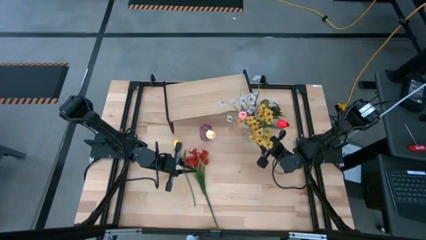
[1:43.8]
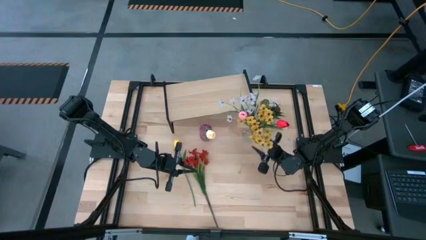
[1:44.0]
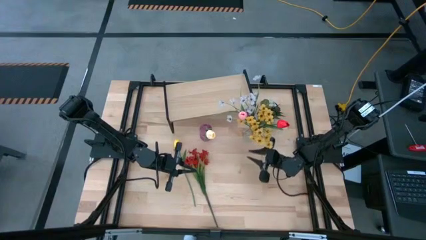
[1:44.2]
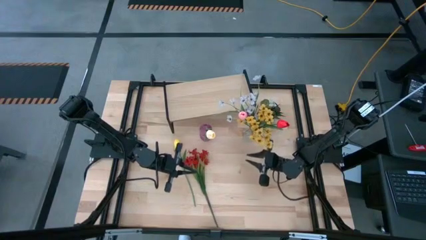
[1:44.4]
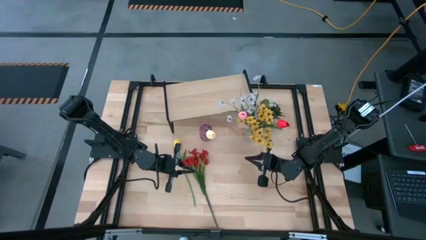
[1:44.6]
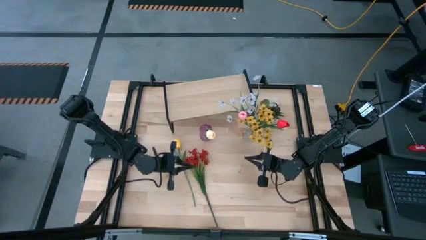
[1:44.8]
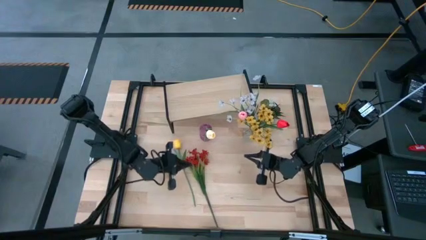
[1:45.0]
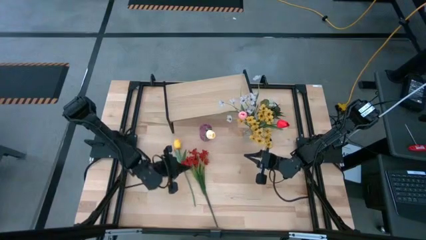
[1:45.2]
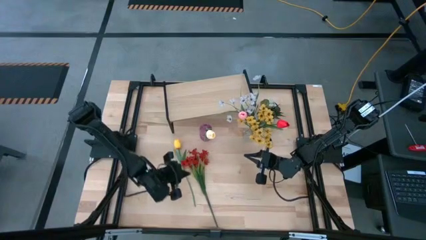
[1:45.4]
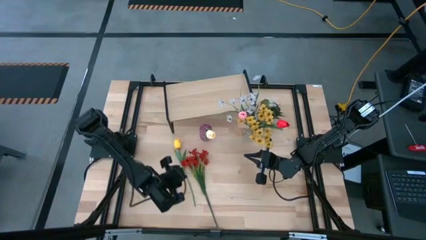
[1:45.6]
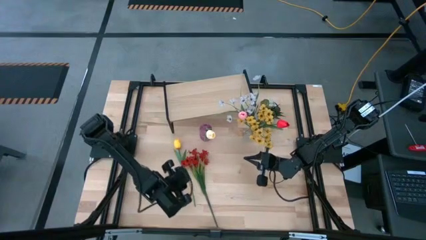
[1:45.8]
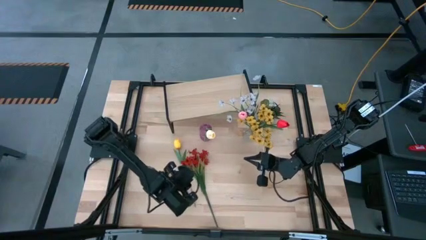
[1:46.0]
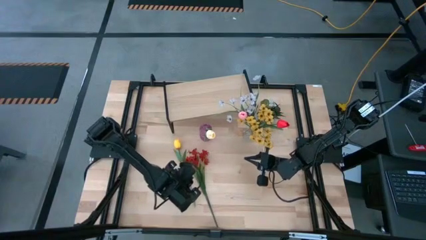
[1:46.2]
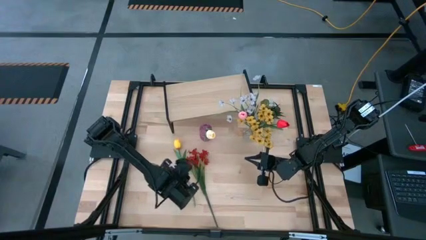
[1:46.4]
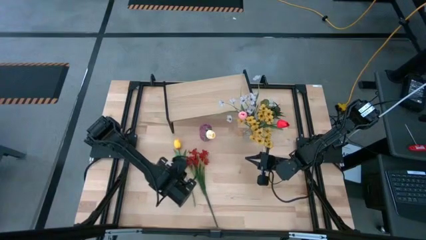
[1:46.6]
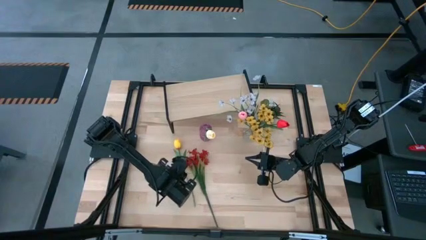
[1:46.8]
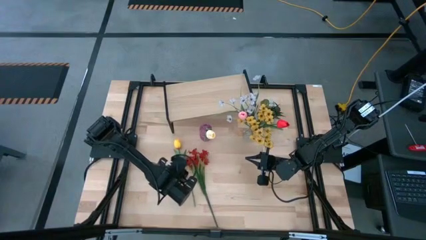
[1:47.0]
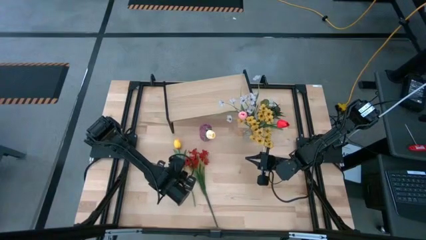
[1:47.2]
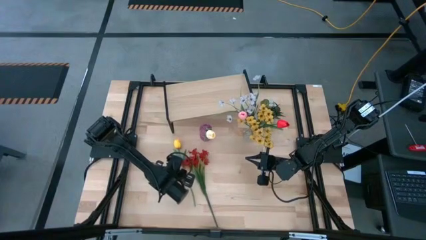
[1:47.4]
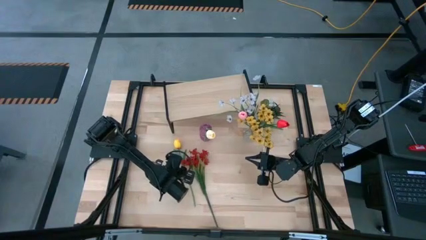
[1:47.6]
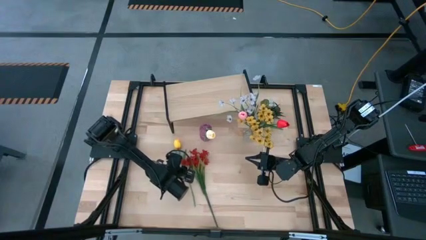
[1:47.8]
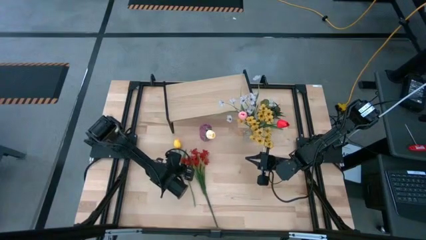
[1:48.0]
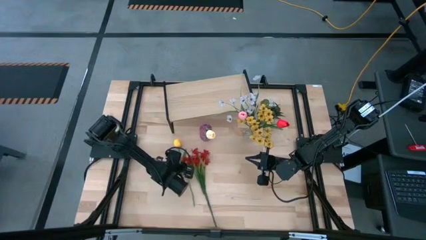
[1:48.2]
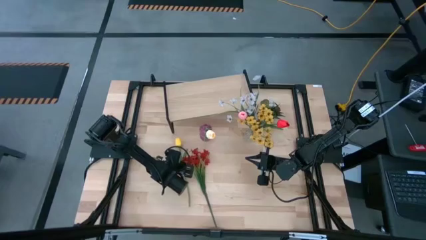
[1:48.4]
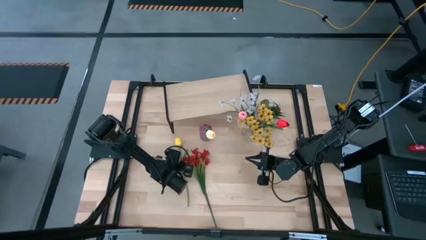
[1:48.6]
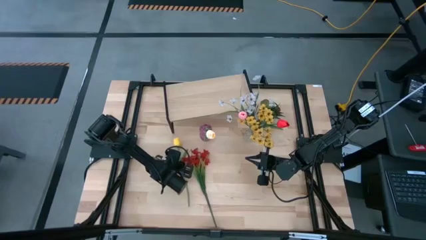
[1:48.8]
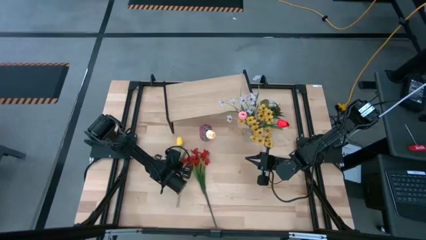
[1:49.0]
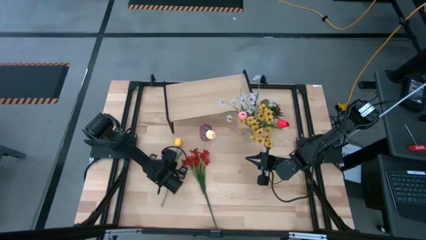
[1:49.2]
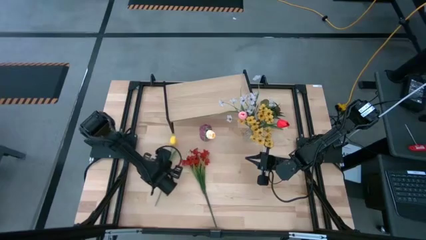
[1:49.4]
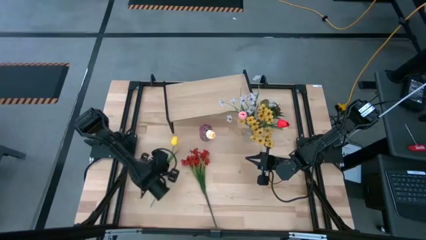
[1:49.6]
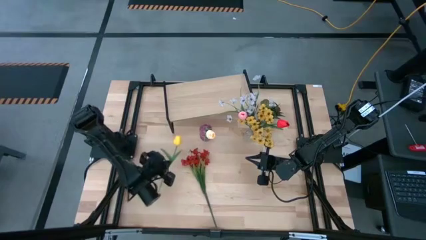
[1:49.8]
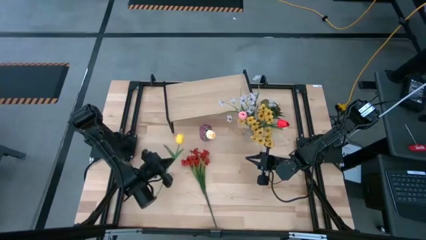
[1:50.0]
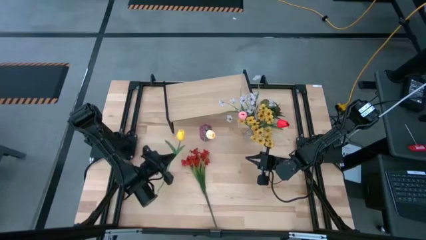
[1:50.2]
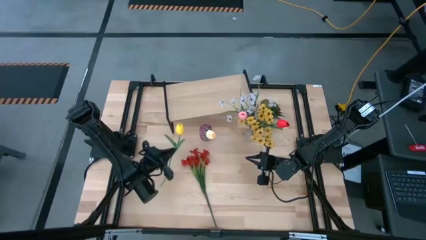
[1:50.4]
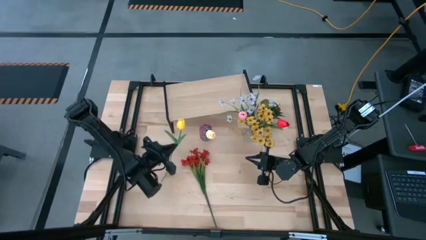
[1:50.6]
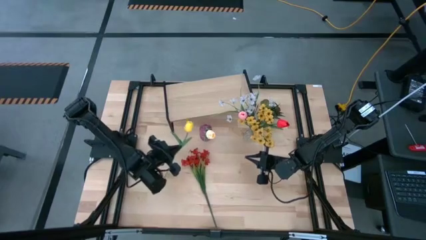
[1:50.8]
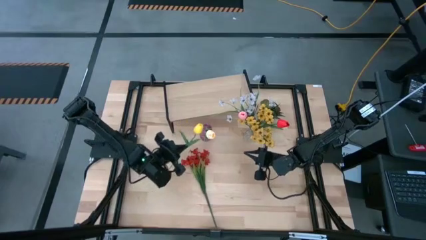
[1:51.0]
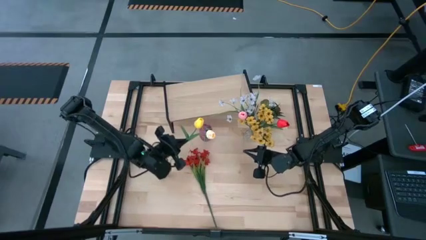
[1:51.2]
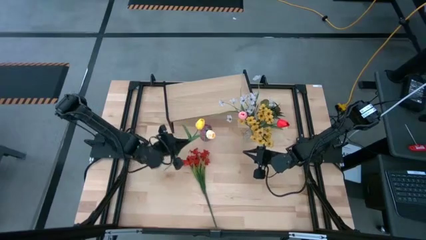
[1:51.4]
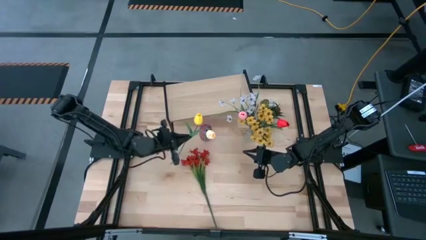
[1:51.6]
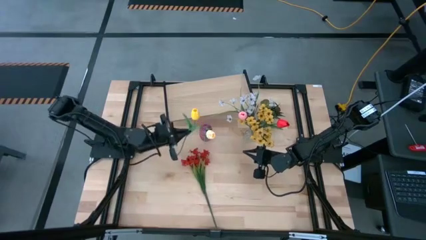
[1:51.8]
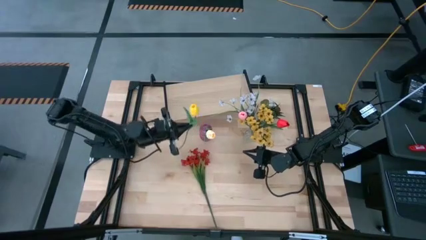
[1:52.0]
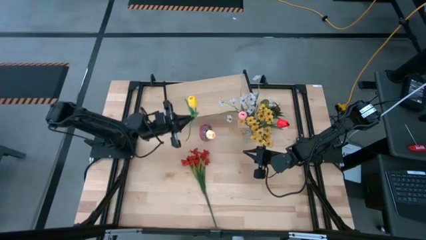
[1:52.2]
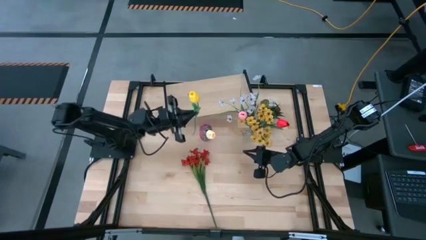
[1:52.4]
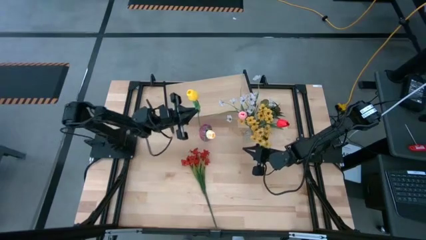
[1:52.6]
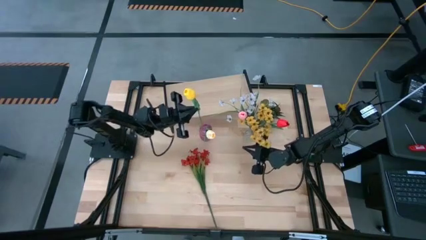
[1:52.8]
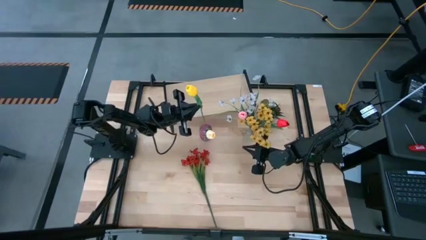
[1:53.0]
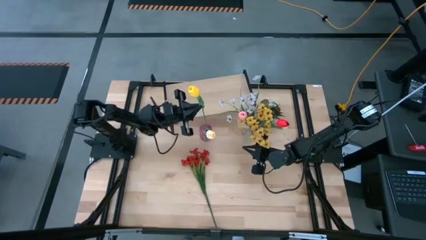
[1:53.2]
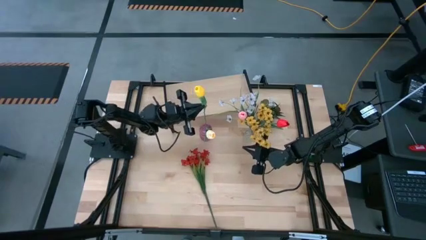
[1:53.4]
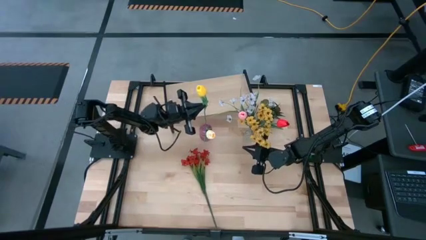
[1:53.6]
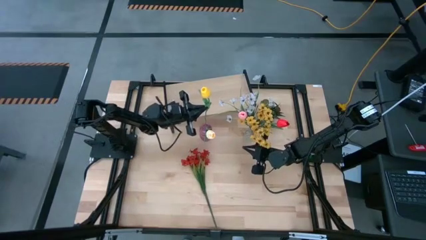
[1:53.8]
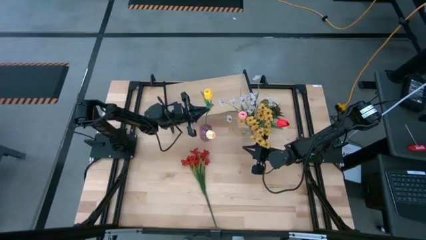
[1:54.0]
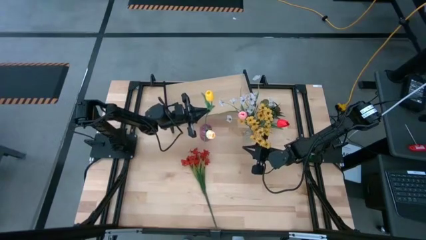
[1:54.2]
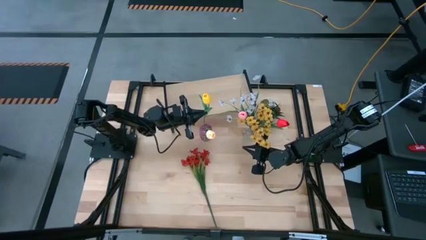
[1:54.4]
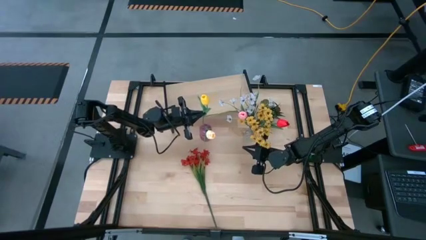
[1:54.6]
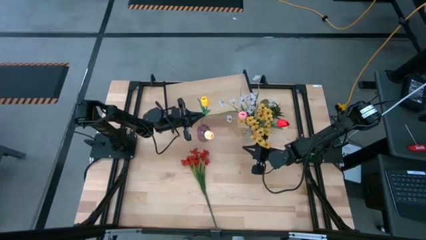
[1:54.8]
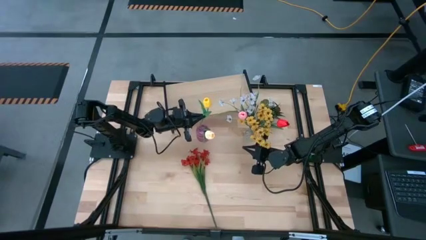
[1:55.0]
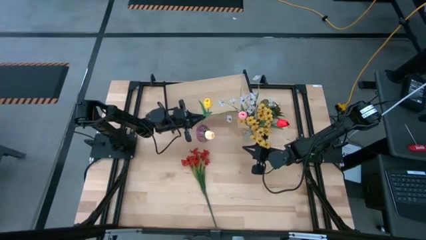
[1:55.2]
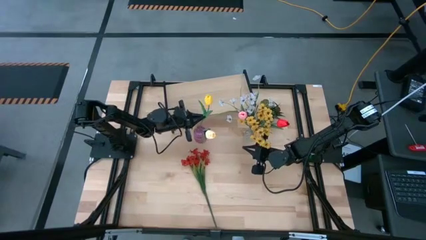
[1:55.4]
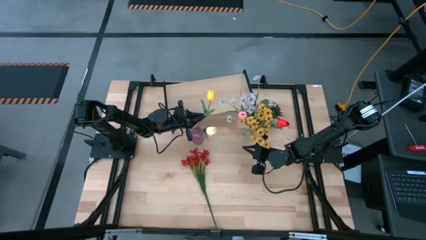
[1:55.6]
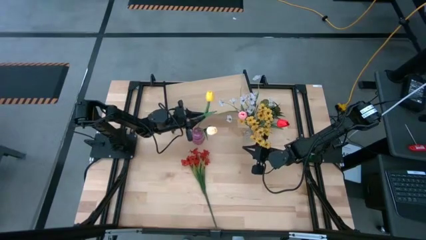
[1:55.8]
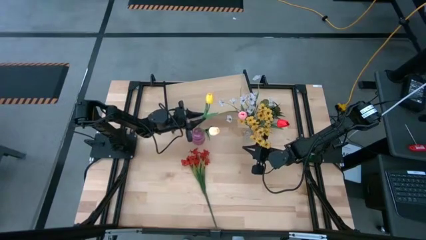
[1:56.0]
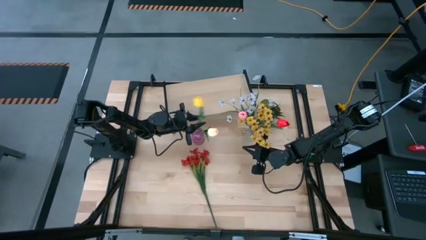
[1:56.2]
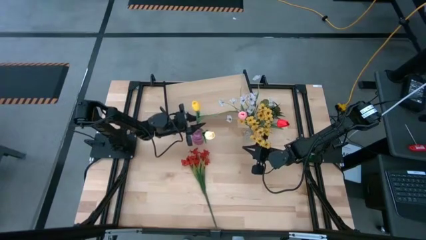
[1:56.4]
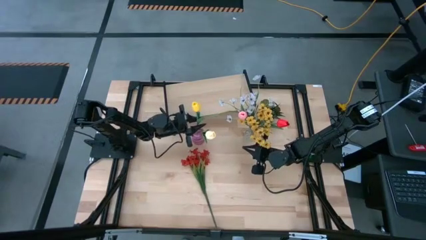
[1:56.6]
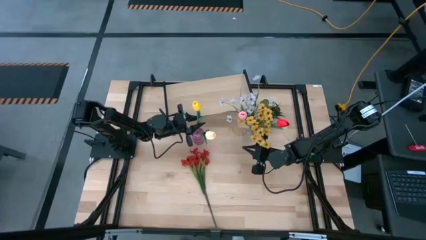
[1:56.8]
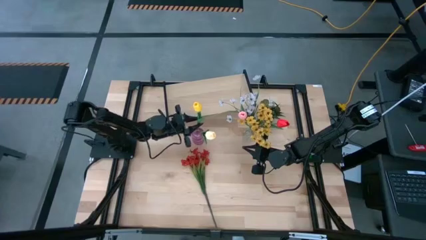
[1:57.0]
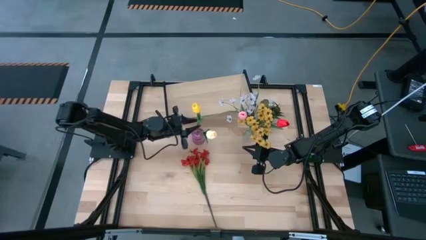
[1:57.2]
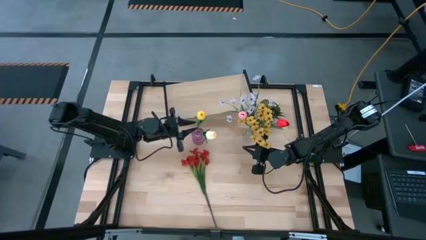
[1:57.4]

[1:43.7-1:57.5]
Task: Pick and place flowers into a vace then onto a shelf
Put the yellow flower into the pink vase

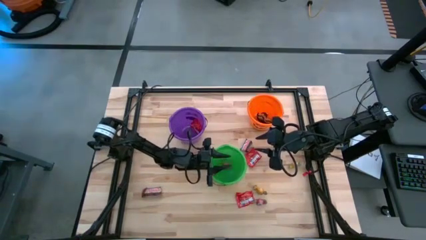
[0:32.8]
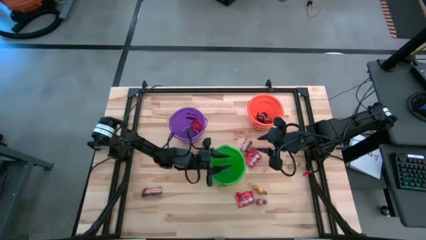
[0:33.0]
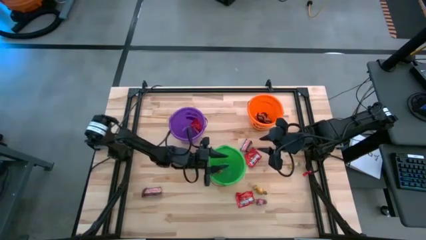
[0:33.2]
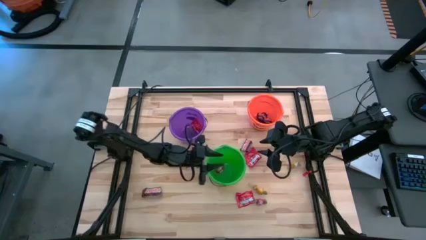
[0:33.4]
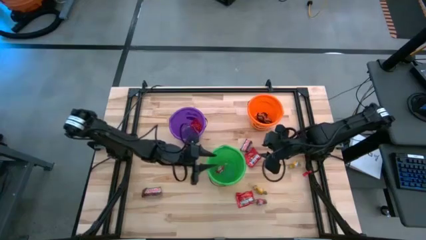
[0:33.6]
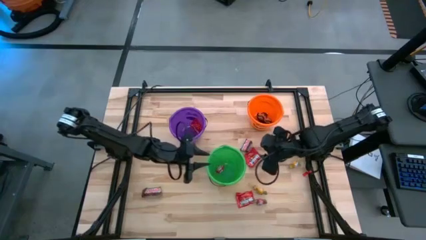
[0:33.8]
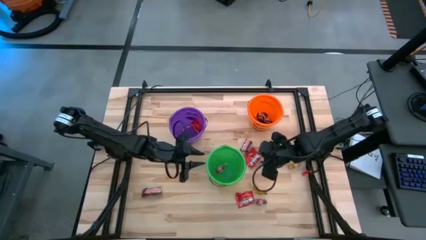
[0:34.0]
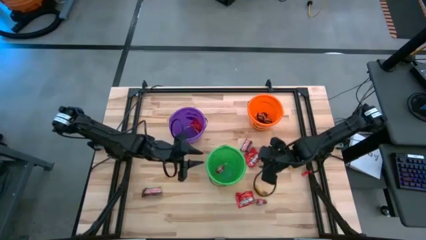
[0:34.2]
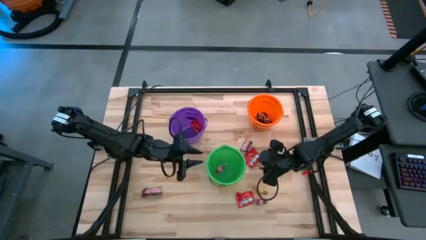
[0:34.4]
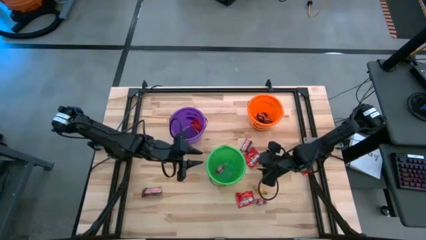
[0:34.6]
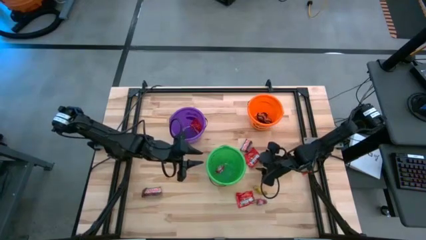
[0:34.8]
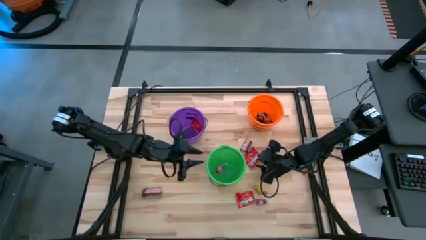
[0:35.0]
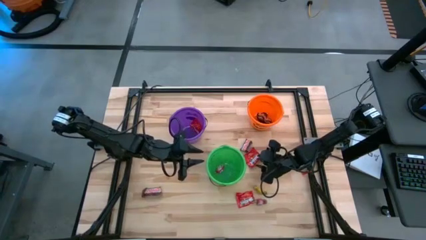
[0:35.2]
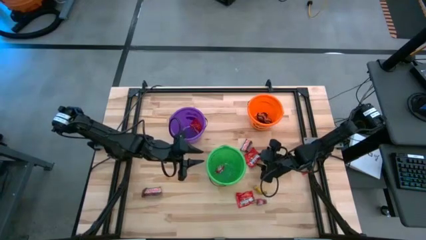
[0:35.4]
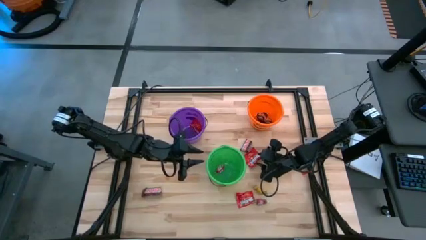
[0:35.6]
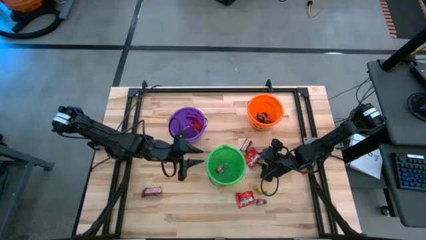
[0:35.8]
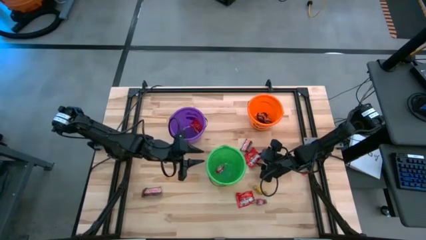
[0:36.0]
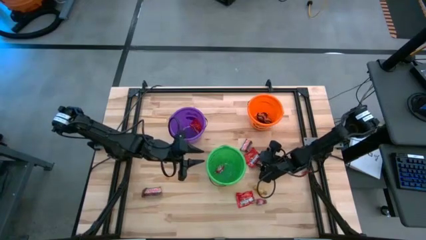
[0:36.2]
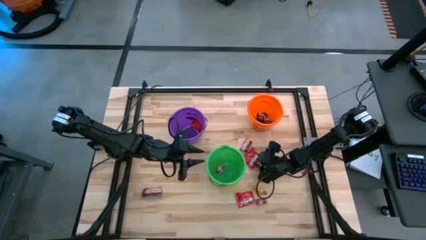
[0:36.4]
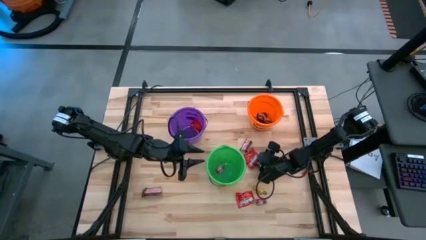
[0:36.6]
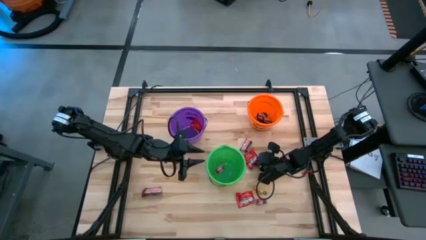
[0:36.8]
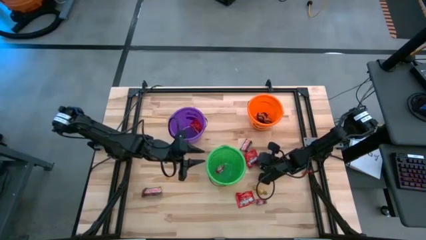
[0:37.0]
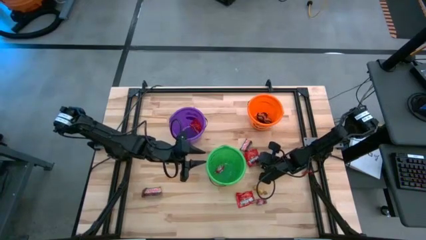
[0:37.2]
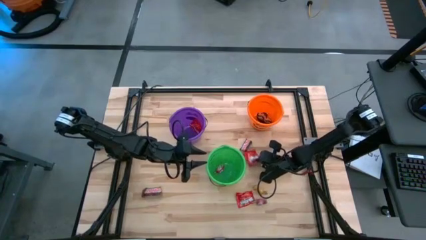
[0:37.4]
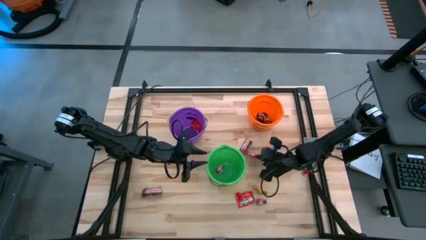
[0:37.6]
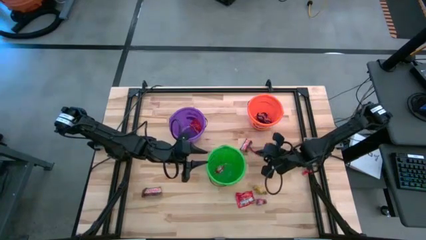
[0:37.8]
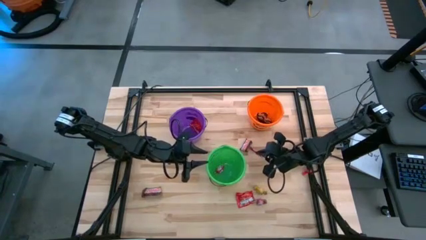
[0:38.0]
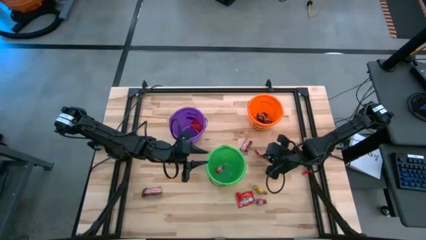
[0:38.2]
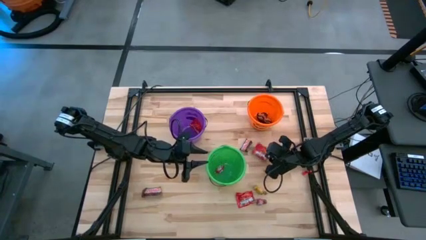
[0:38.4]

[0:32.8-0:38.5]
Task: Organize candy in baskets
Put the red candy into the purple bucket
